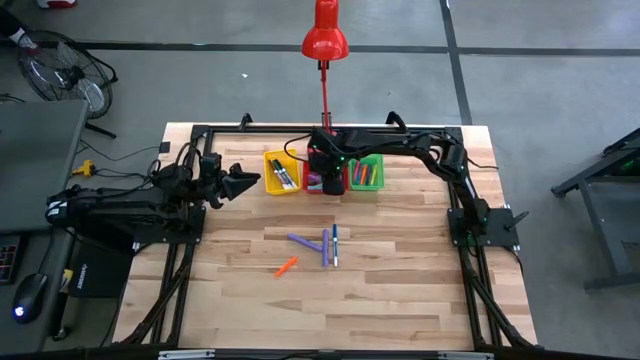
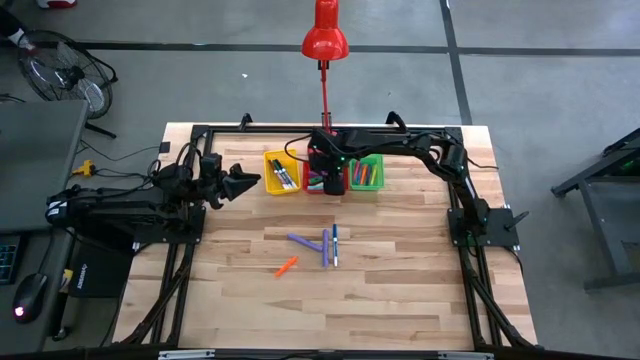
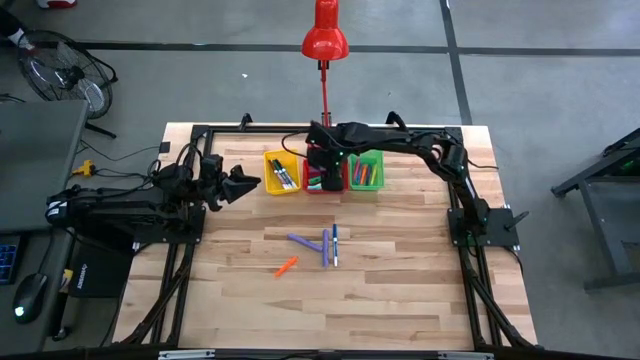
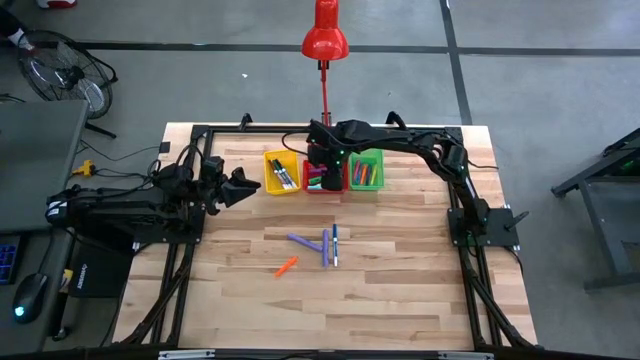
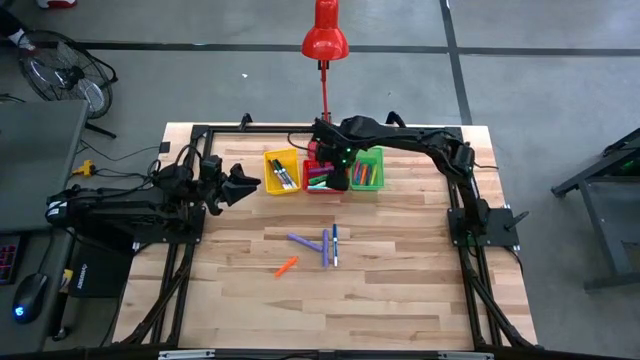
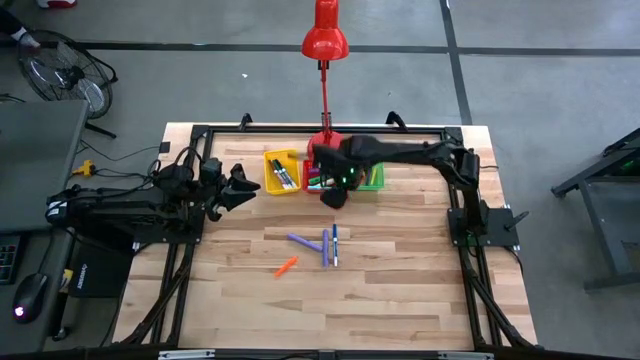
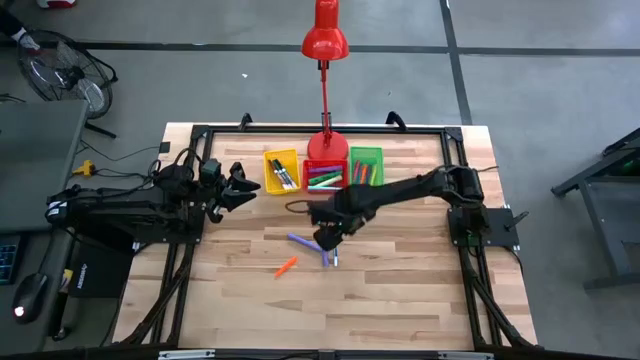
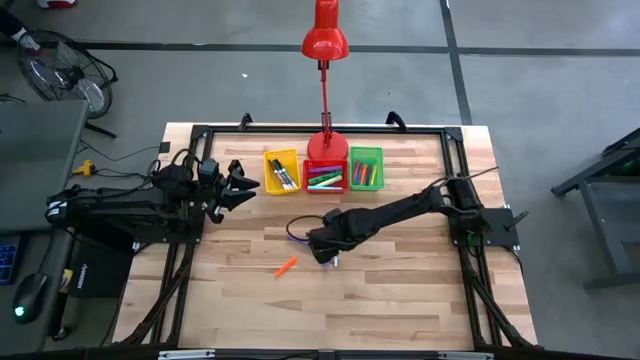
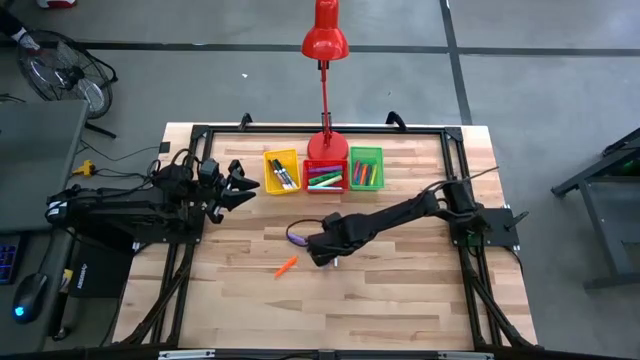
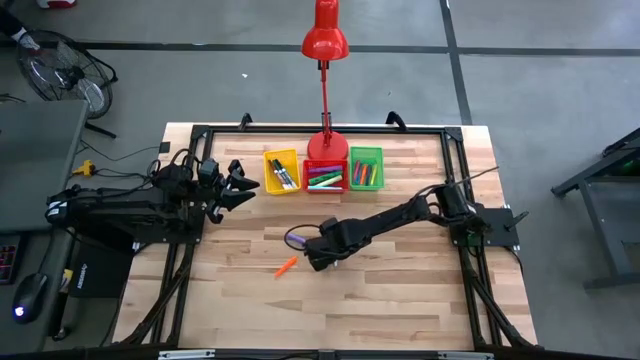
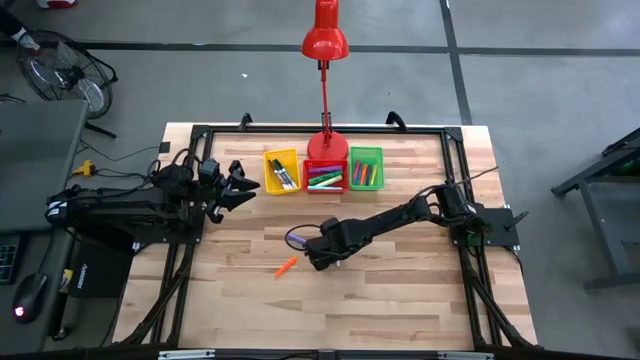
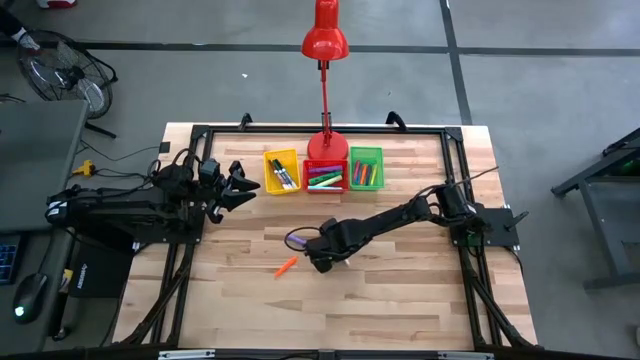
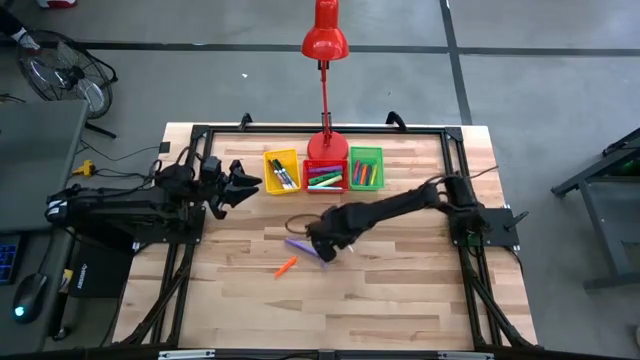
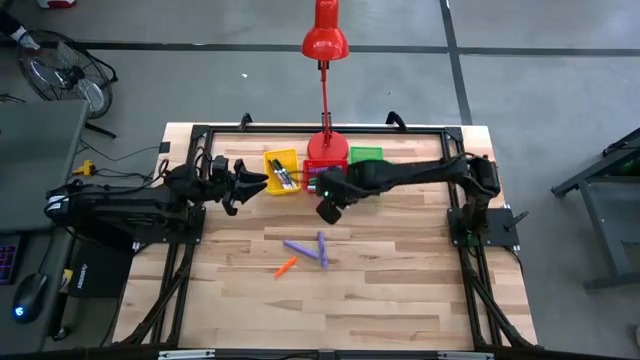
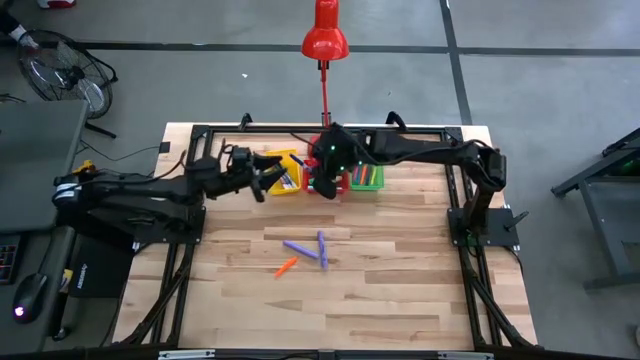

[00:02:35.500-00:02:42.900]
Task: Pick & Place Markers
Put the blue marker pen into the yellow bin

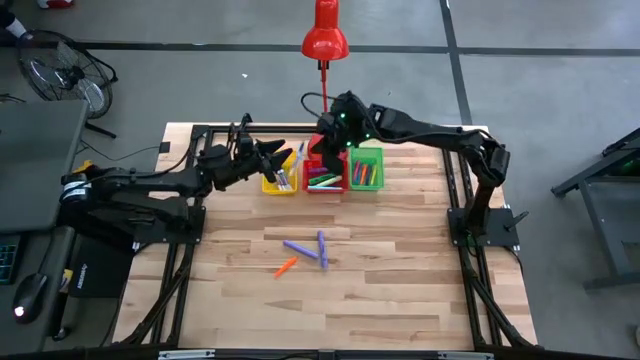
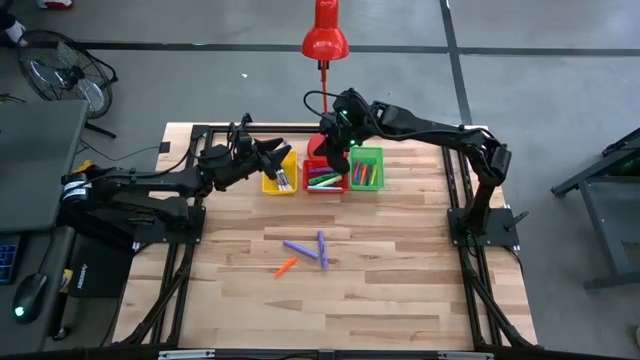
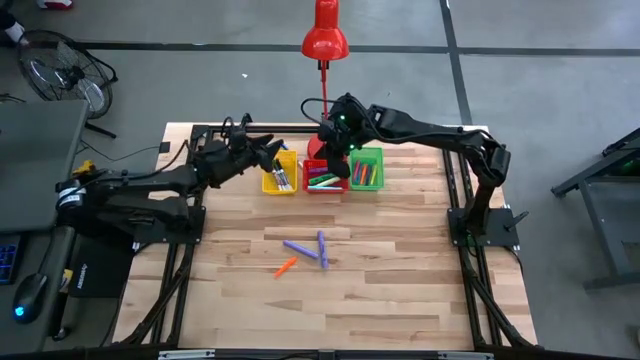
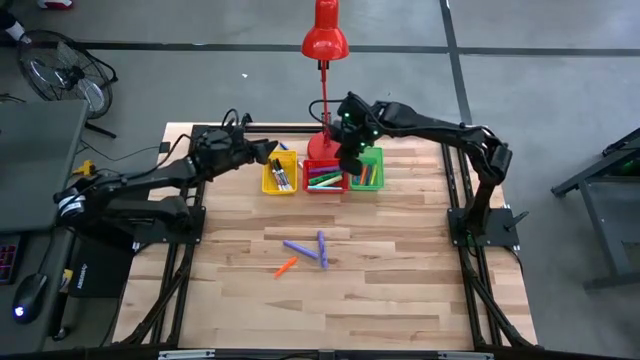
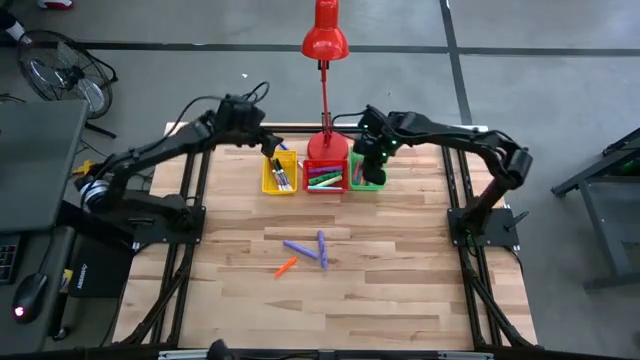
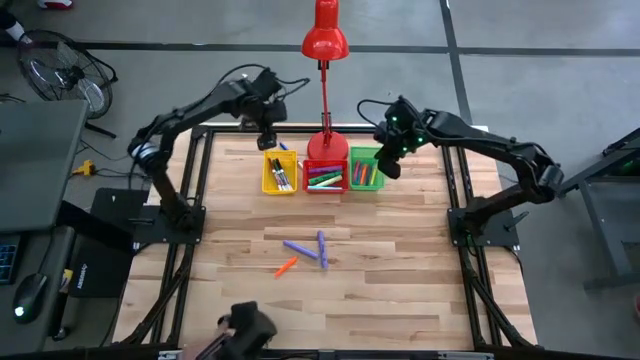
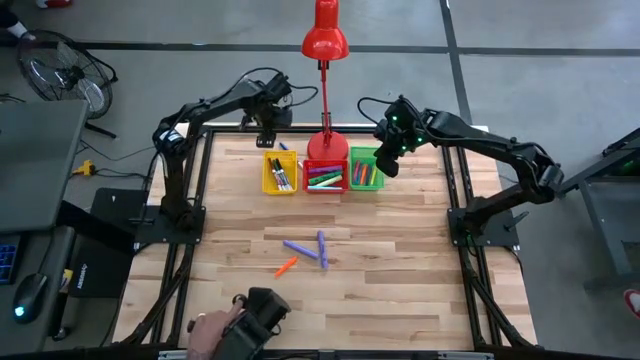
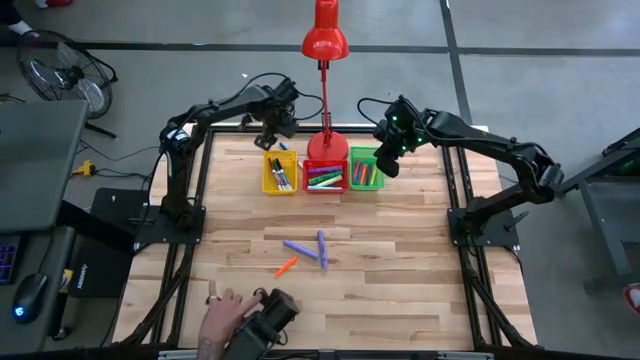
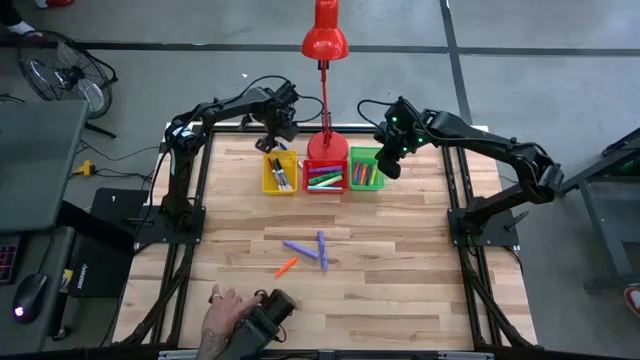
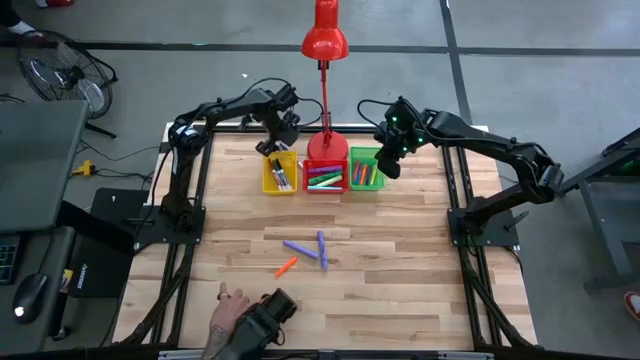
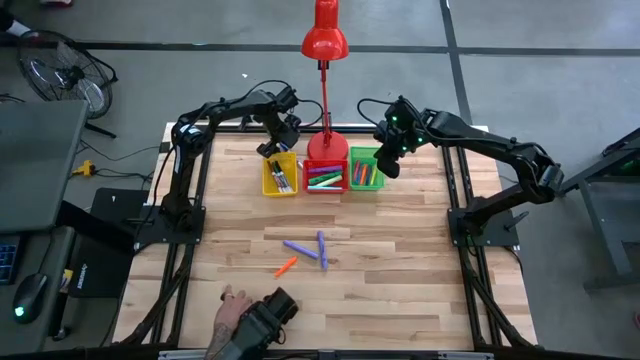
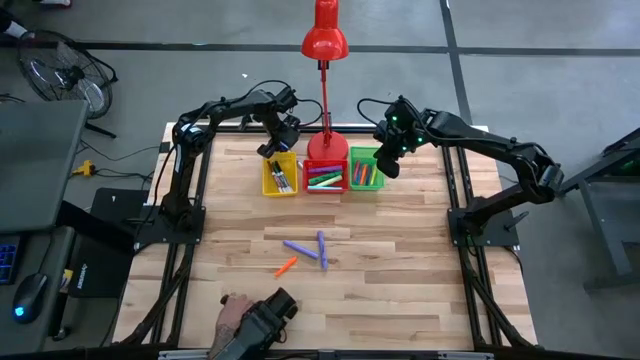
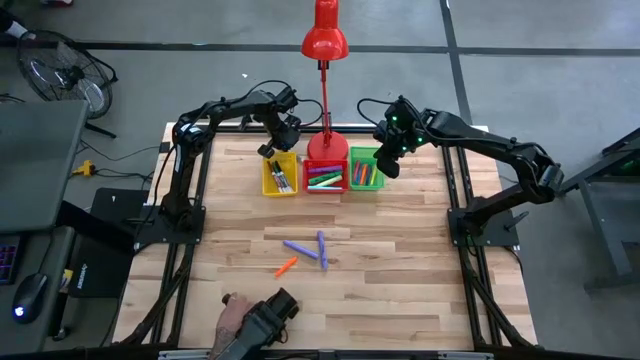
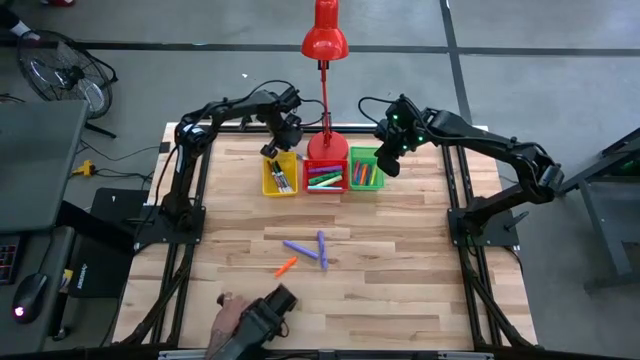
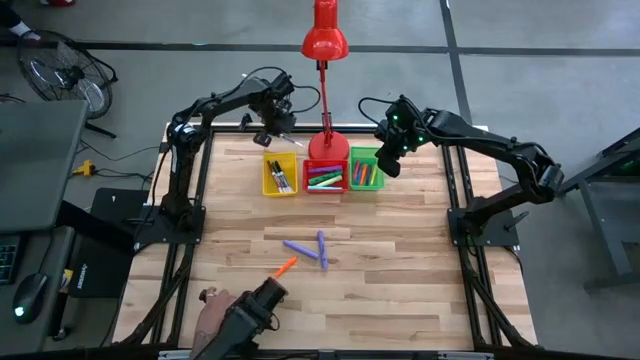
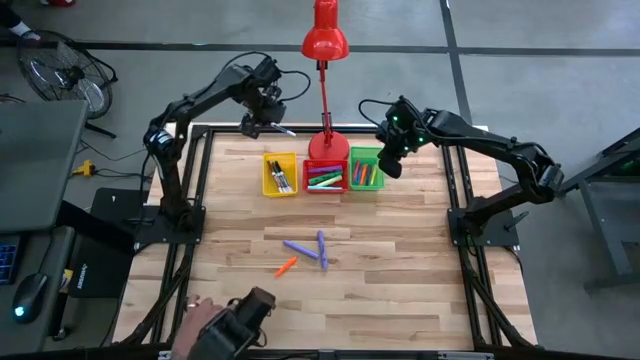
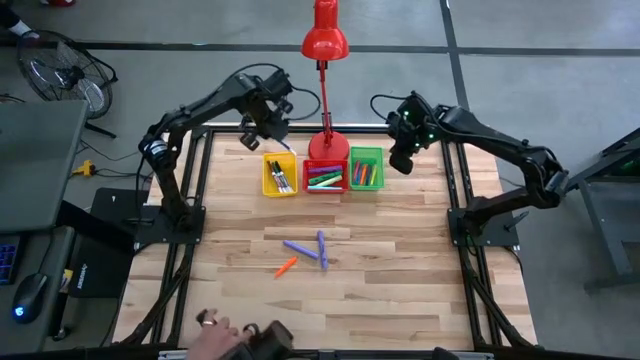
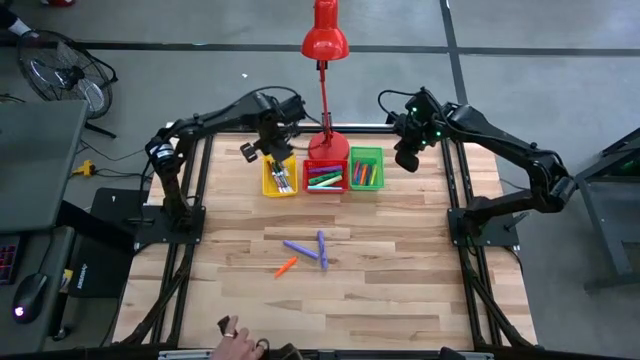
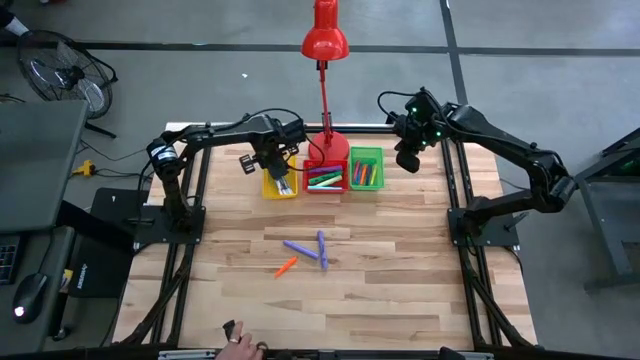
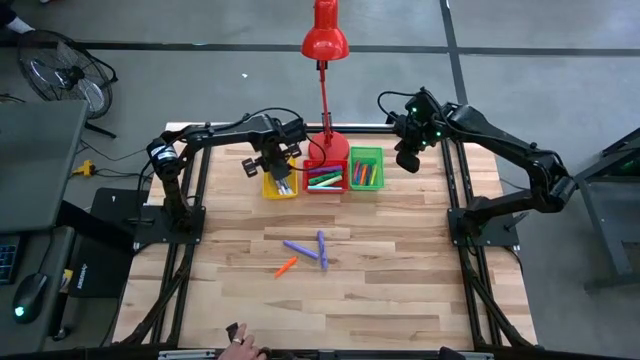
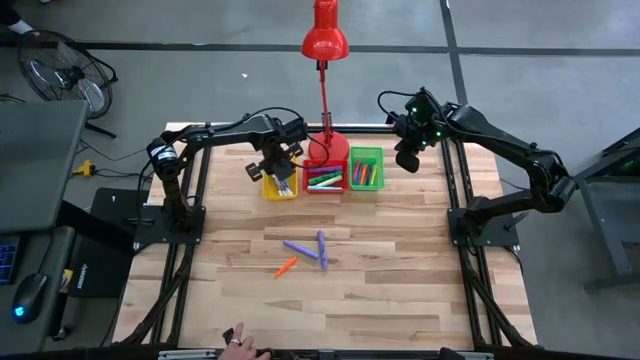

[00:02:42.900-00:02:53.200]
Put the blue marker pen into the yellow bin

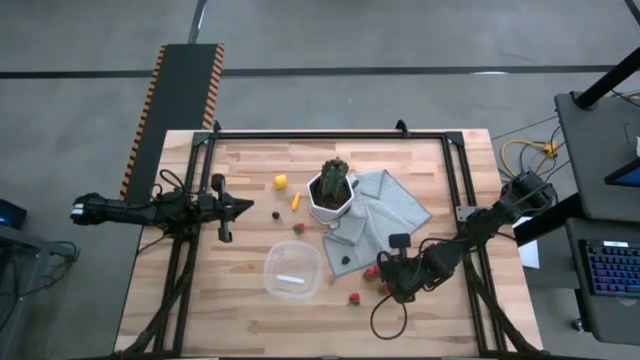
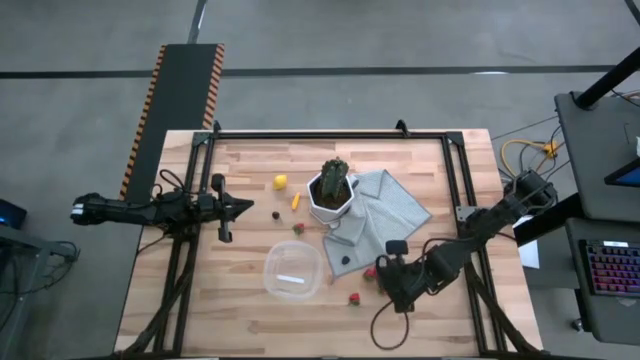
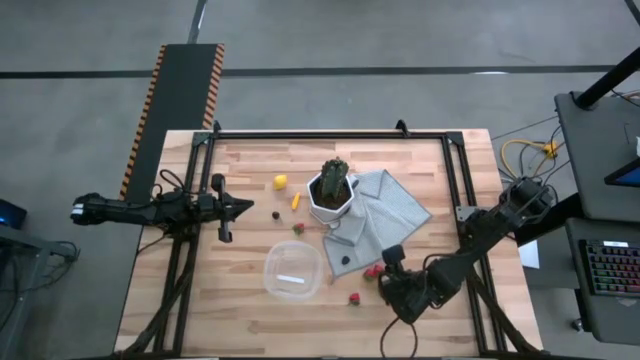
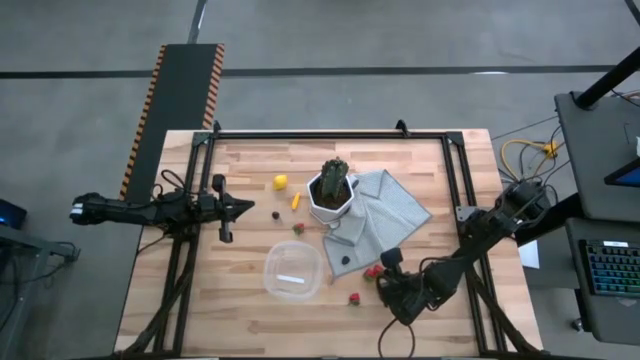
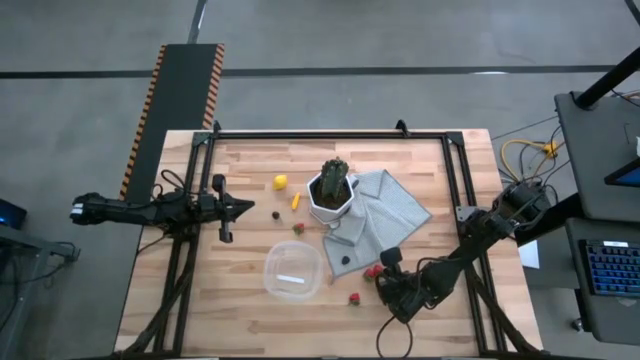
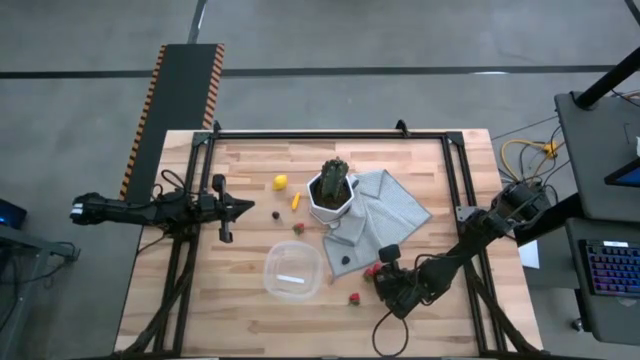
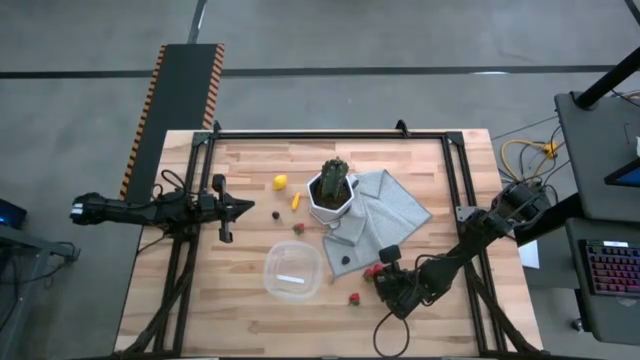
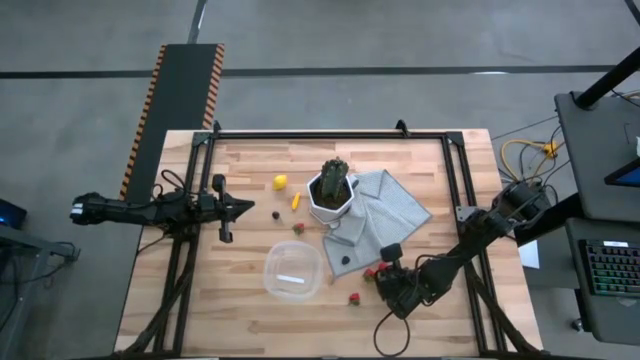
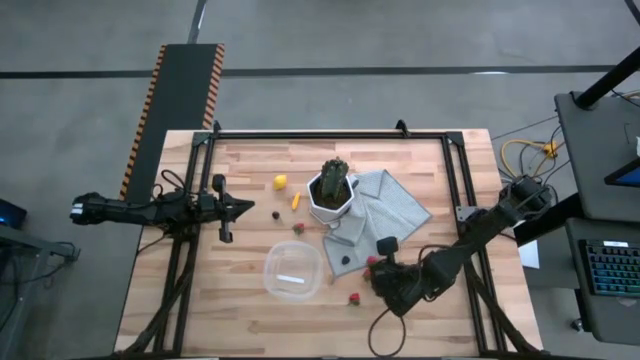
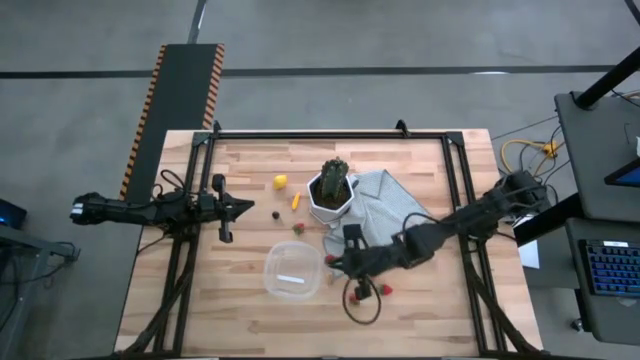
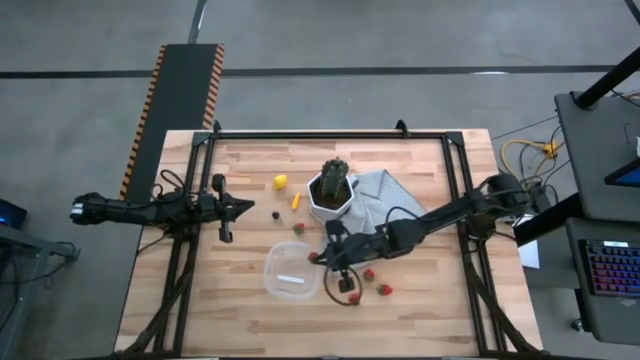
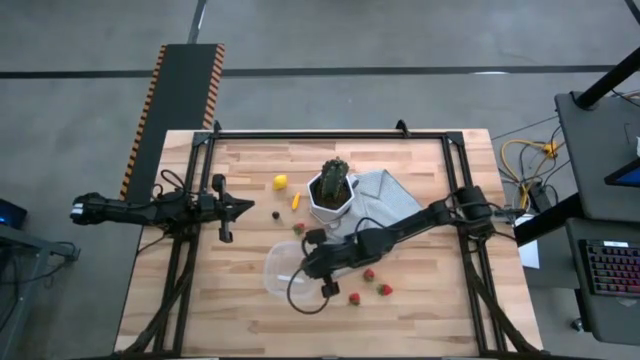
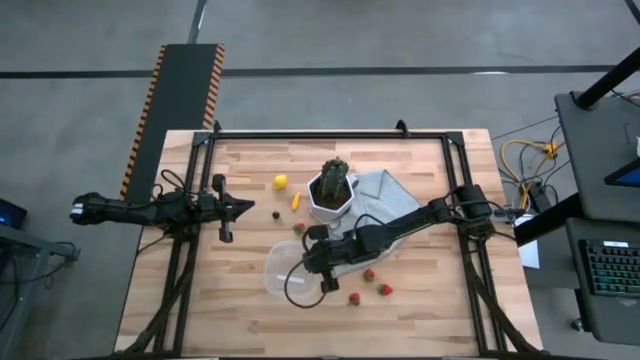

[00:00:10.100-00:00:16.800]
Task: Pick and placing Produce into tupperware
Put the strawberry into the transparent plastic container
